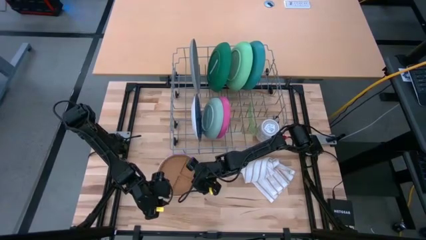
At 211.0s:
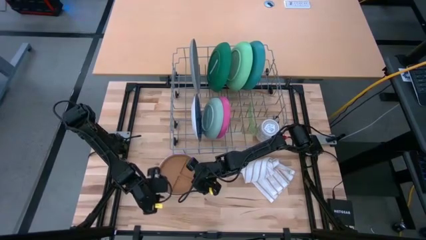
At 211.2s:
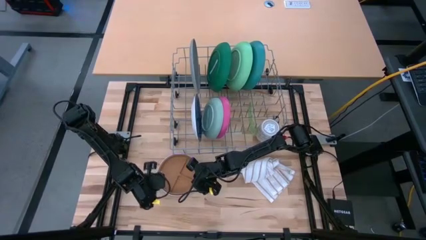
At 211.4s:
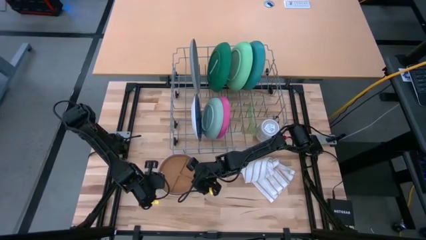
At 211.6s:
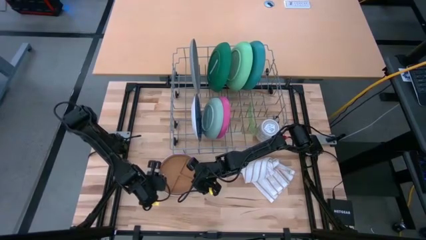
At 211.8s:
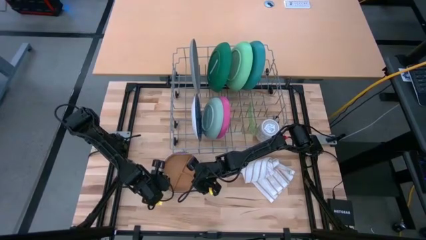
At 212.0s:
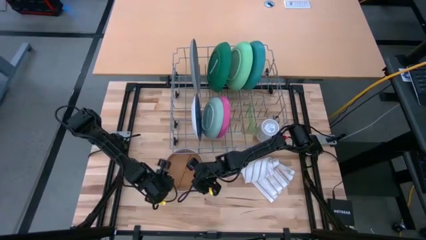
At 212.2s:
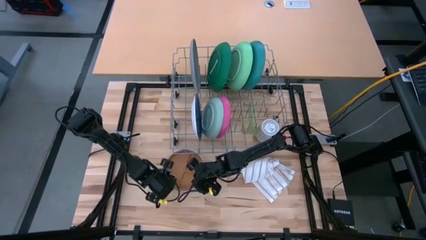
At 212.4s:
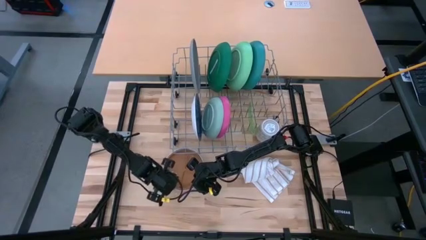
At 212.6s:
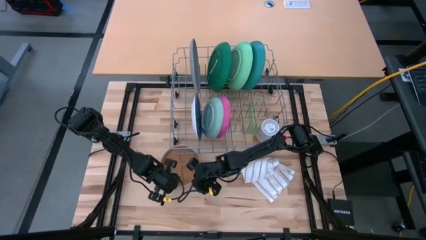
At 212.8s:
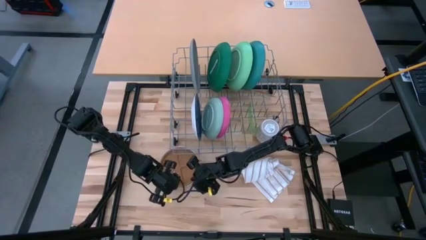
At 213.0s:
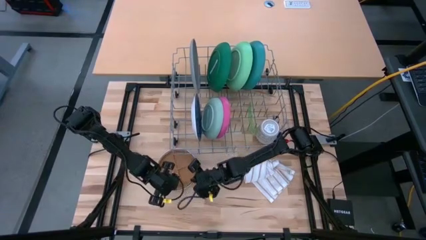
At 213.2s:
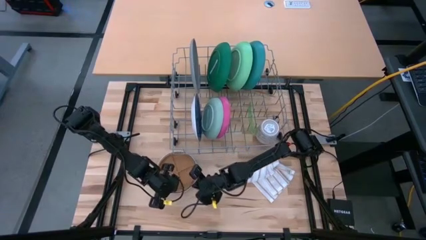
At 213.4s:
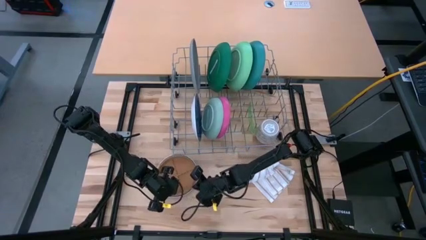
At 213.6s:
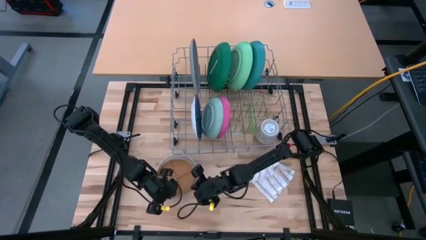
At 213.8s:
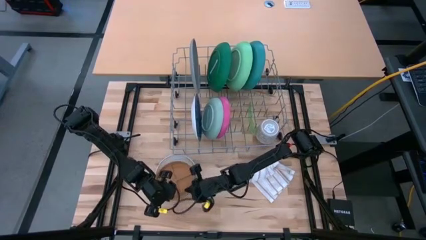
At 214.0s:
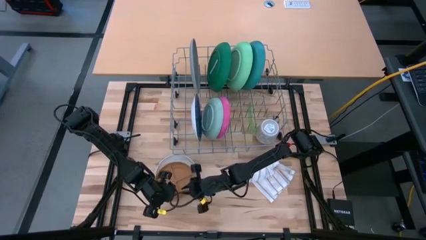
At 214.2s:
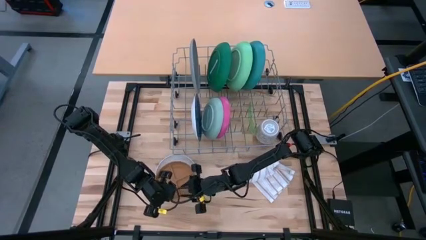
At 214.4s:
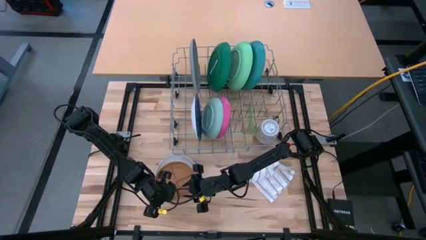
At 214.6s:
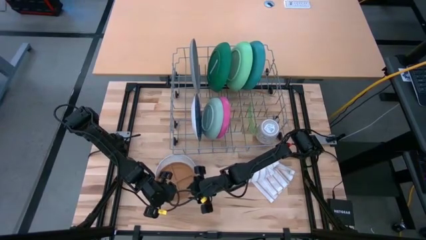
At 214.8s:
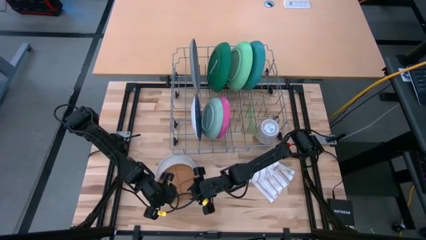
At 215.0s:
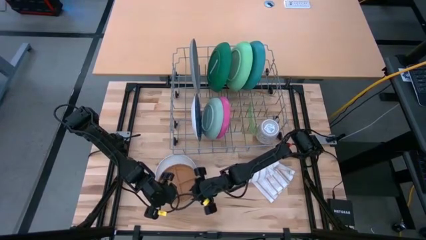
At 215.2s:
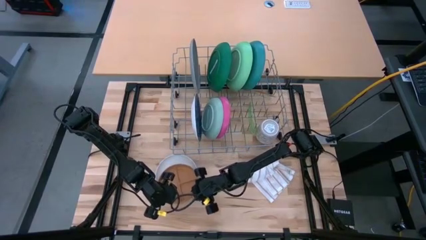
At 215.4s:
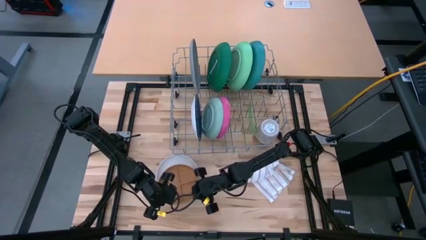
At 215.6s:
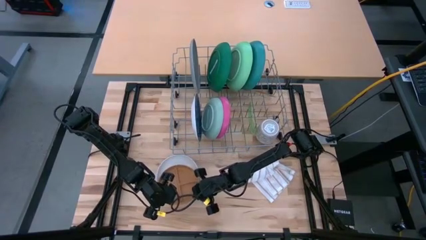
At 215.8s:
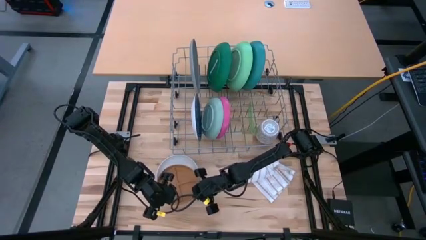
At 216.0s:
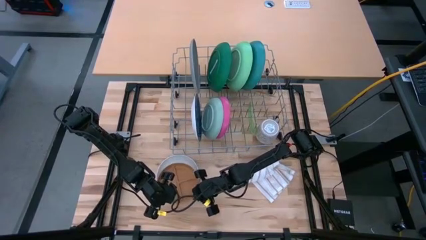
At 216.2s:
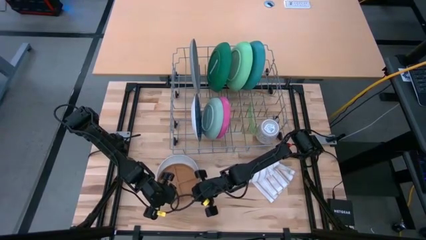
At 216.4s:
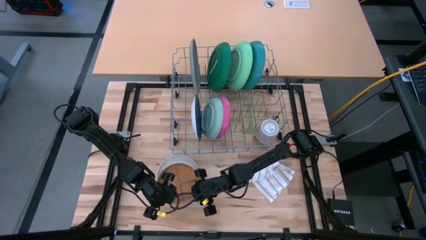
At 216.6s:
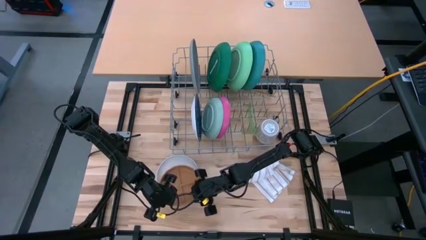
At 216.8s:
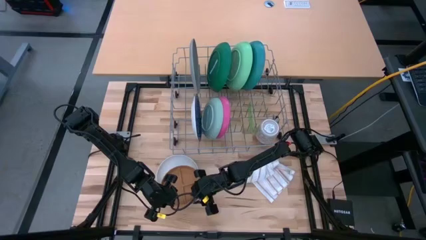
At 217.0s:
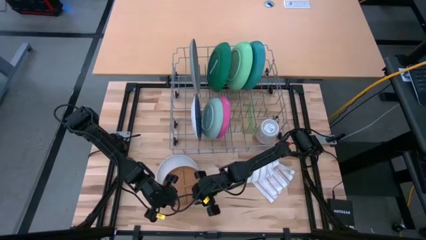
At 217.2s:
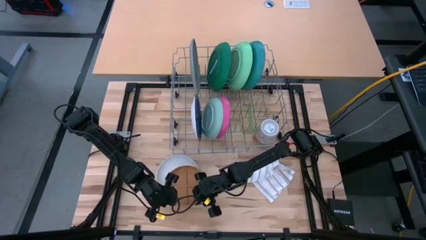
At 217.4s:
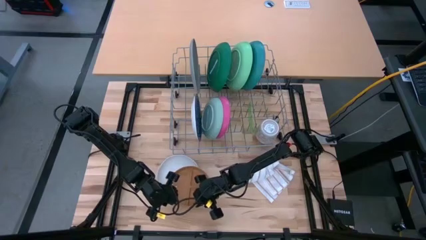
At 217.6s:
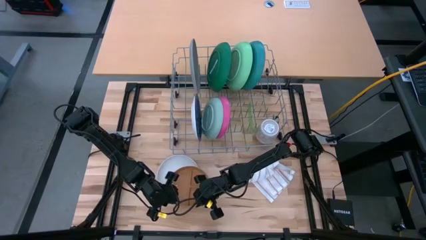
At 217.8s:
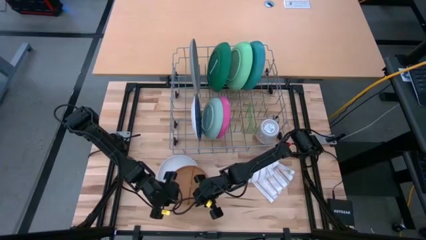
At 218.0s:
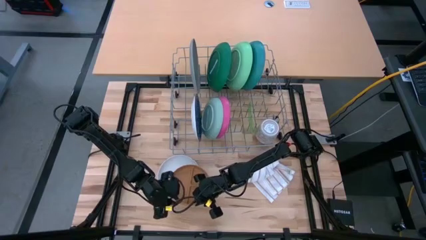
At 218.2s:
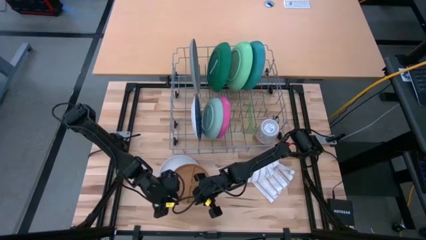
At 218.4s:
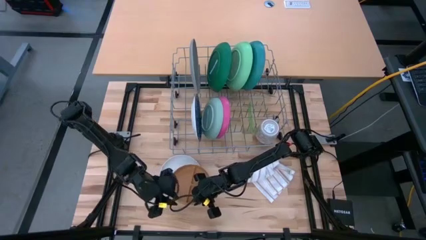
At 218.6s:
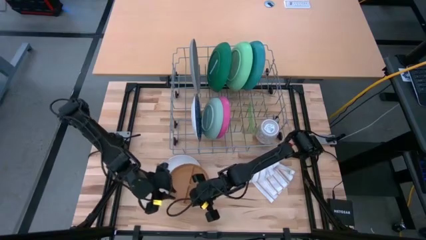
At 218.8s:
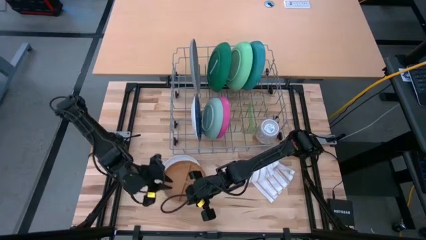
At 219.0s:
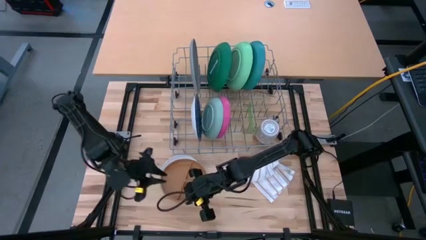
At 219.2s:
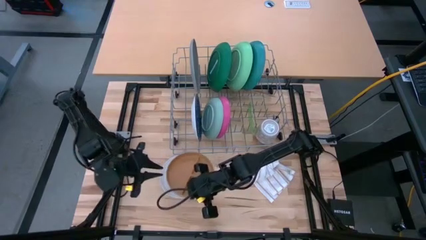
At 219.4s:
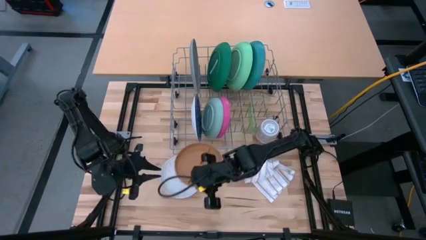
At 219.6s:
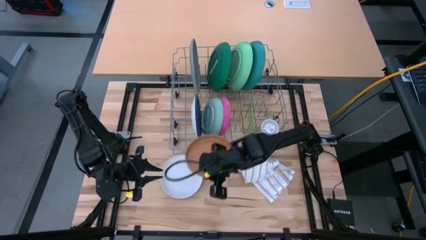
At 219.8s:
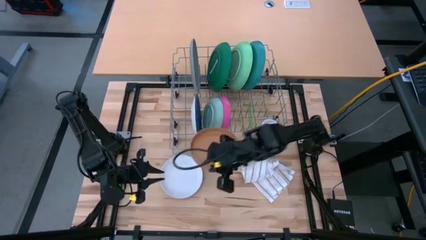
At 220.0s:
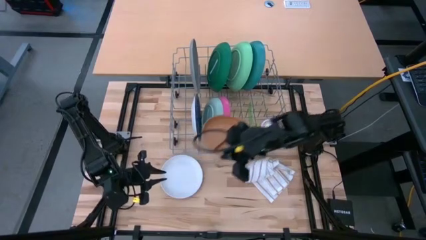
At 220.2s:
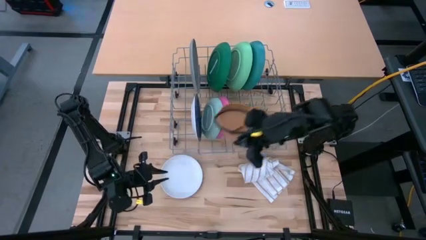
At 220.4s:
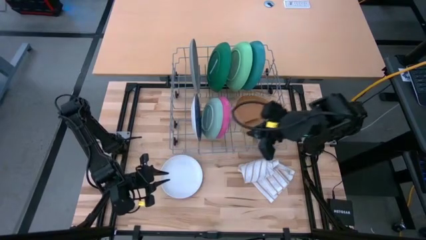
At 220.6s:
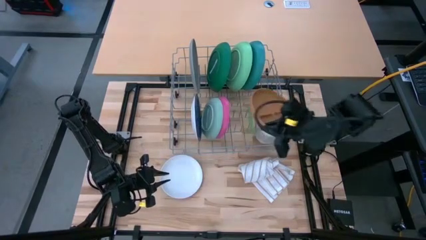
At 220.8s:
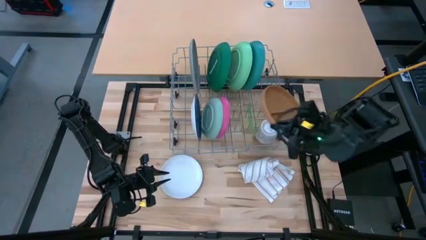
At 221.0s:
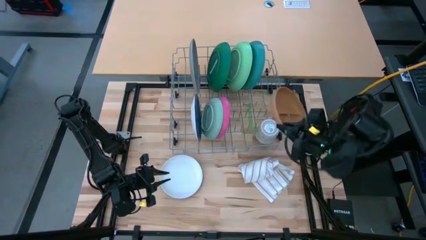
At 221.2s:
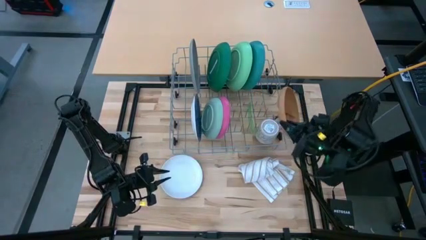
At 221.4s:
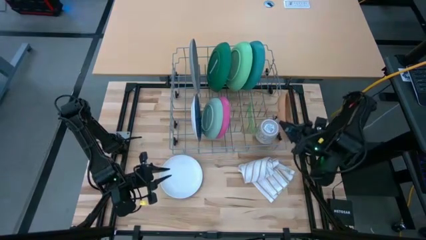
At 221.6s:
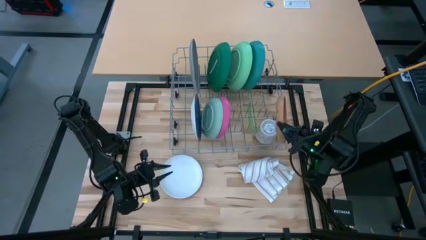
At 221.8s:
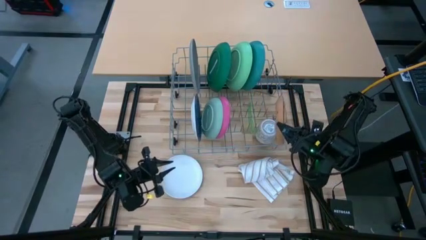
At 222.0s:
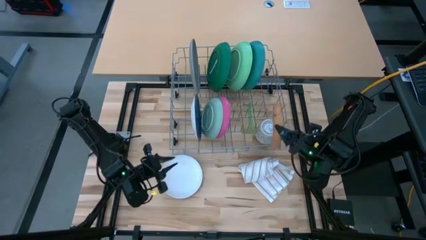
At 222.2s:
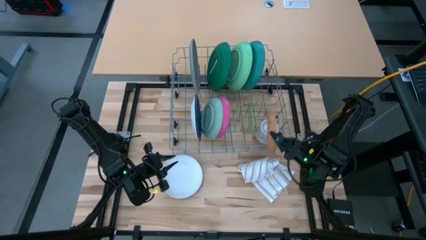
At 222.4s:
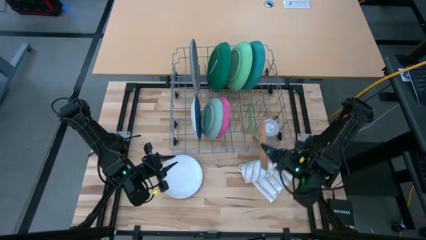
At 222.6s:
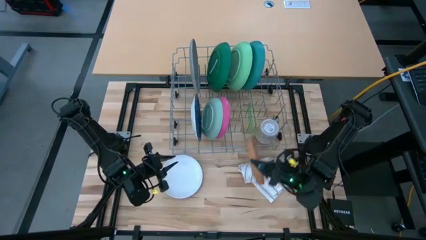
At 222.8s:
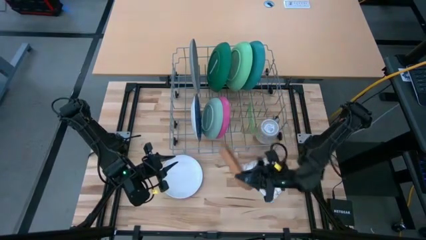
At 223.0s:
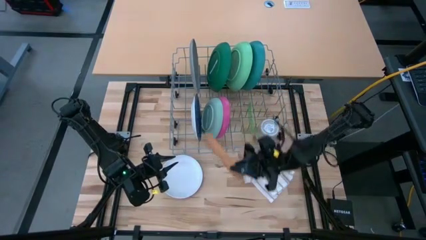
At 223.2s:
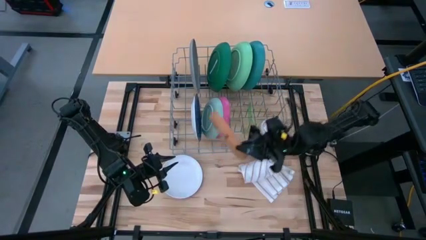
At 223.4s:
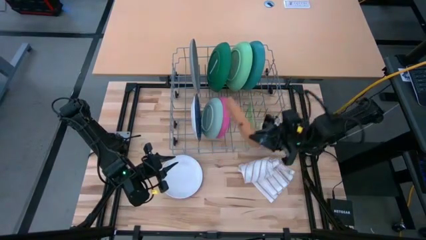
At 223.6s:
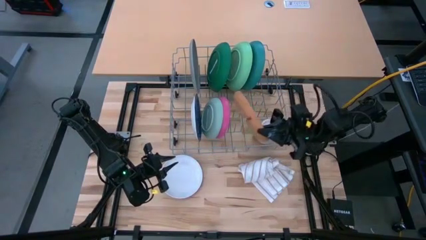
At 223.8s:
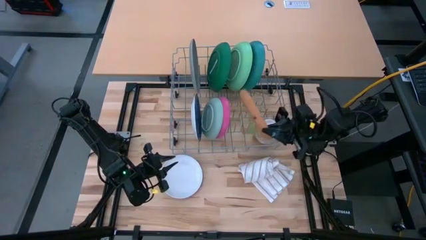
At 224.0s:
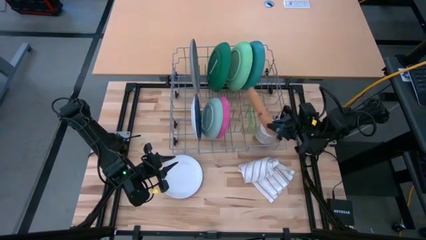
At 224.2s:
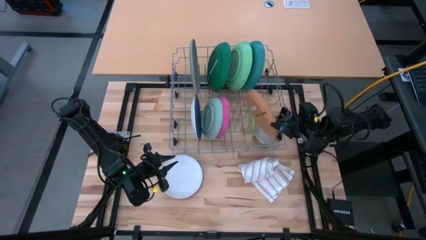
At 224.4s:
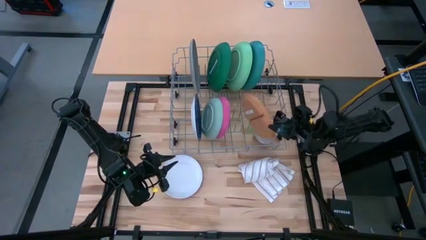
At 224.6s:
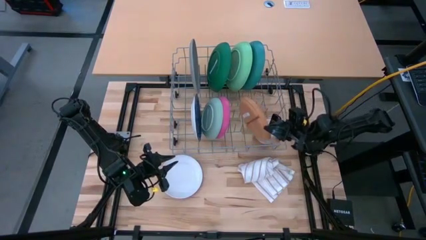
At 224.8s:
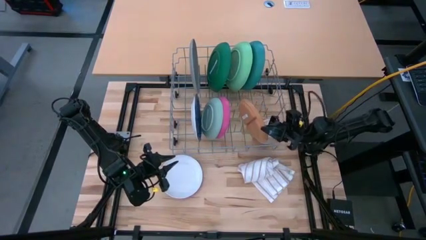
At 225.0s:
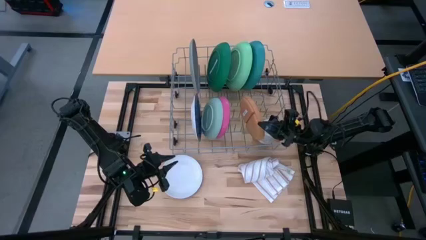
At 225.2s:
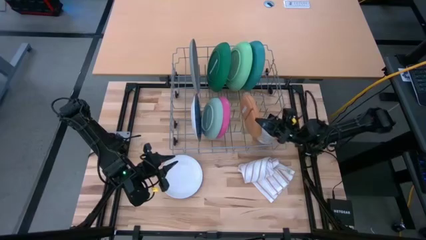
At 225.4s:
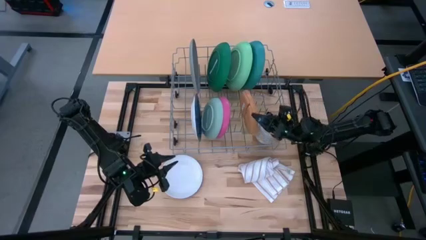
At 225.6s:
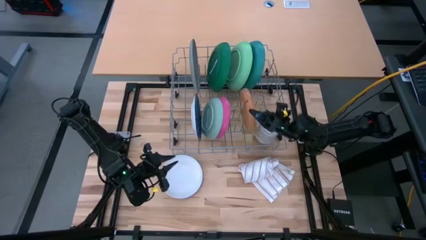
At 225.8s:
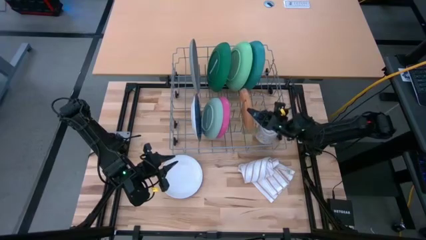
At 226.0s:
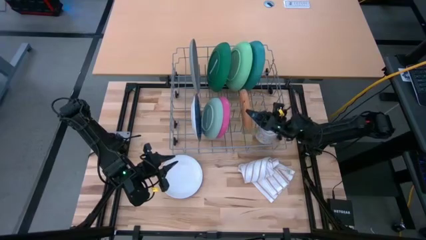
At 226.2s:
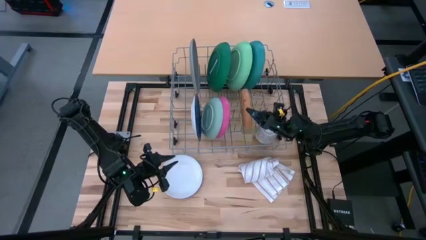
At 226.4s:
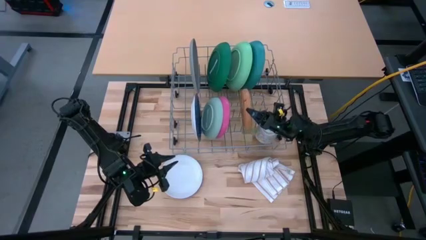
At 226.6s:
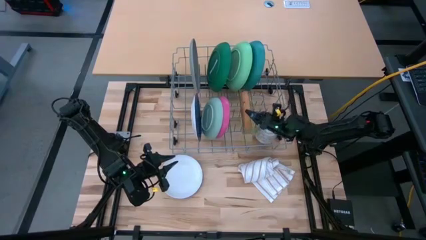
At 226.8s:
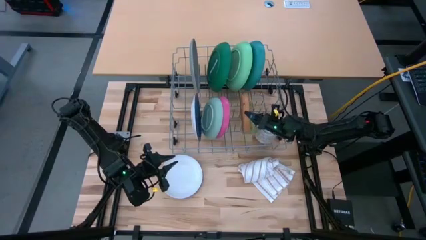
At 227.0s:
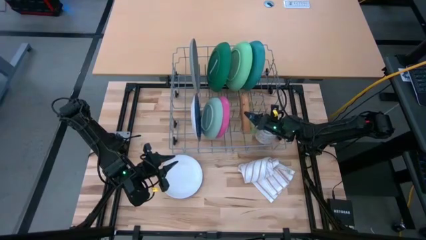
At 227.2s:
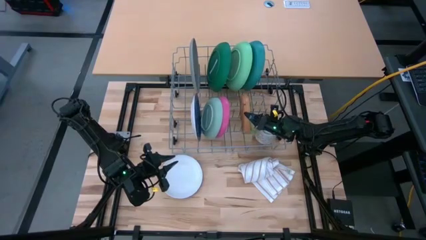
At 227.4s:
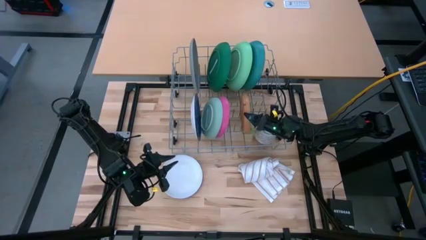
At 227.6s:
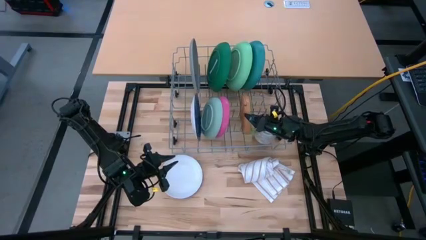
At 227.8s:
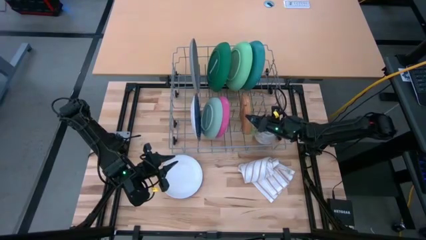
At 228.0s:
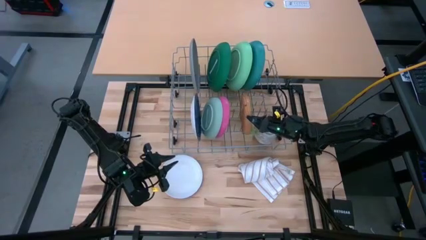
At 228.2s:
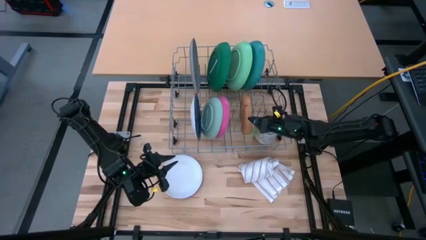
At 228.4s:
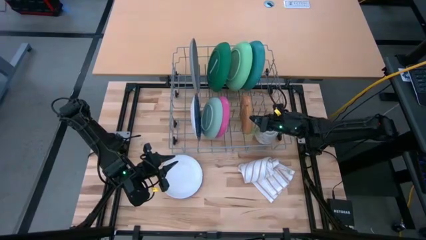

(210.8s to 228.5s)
Task: Sort dishes
Put the brown plate in the dish rack
